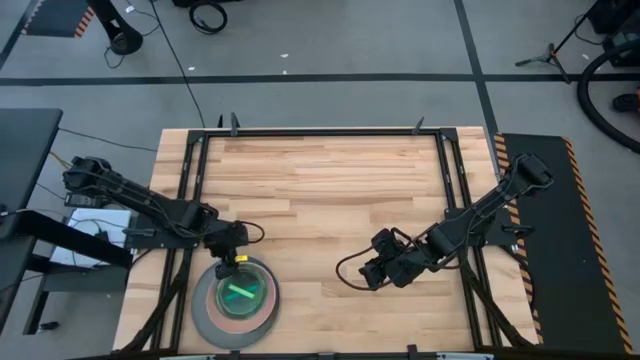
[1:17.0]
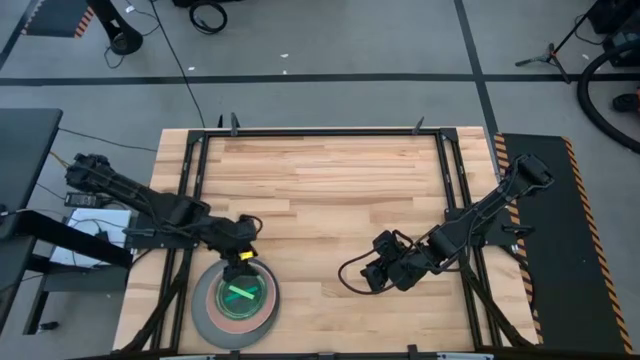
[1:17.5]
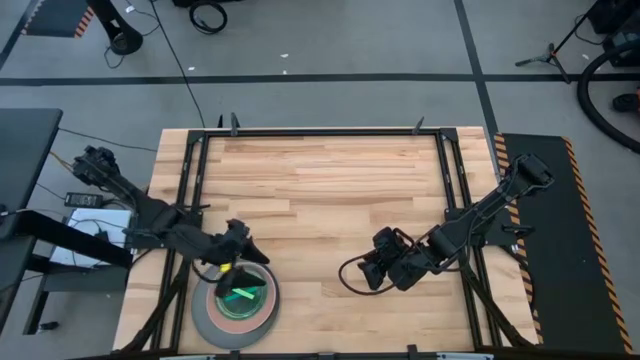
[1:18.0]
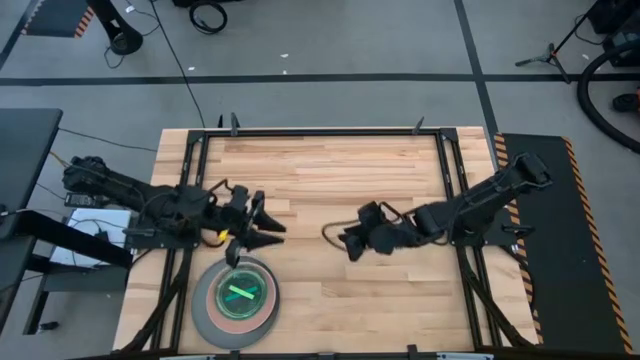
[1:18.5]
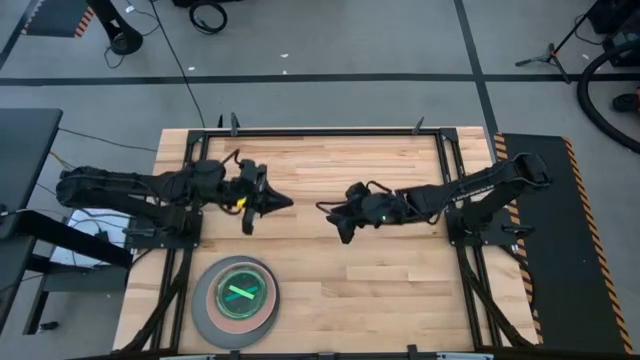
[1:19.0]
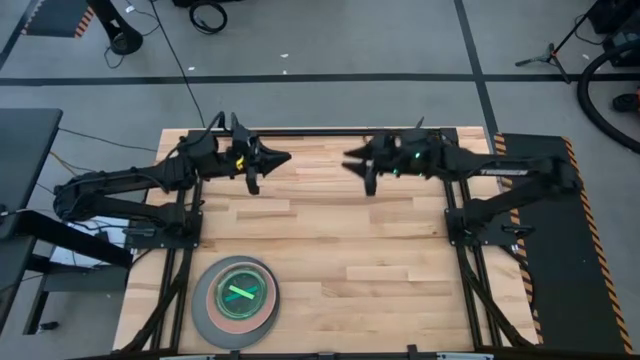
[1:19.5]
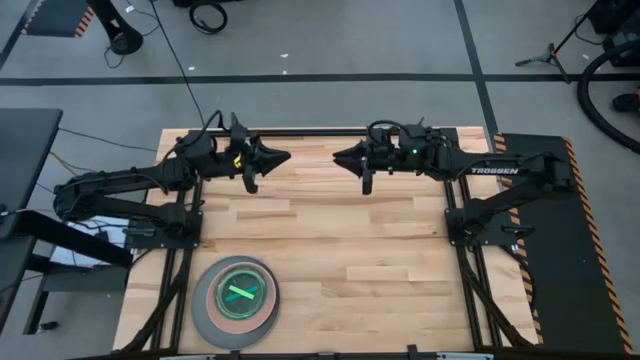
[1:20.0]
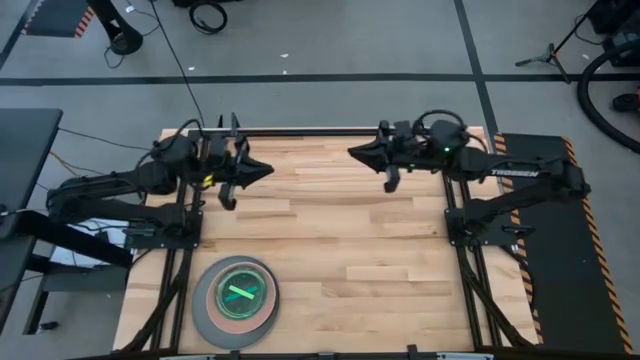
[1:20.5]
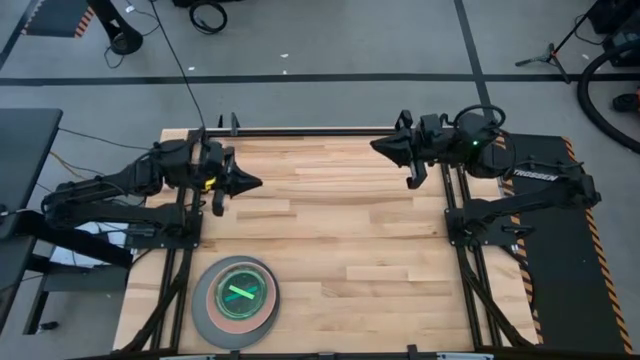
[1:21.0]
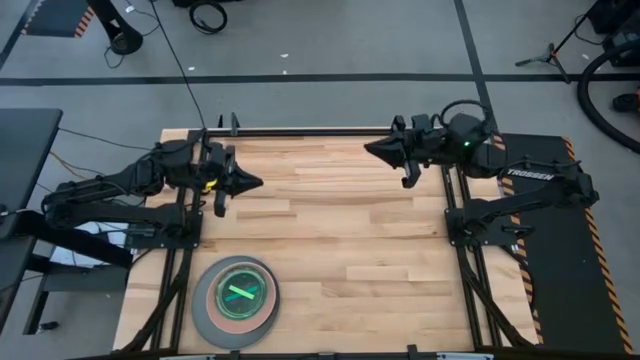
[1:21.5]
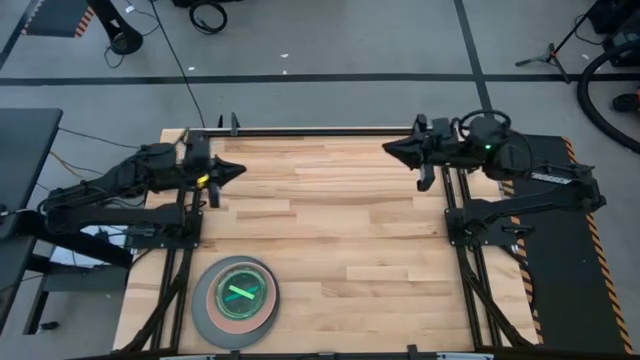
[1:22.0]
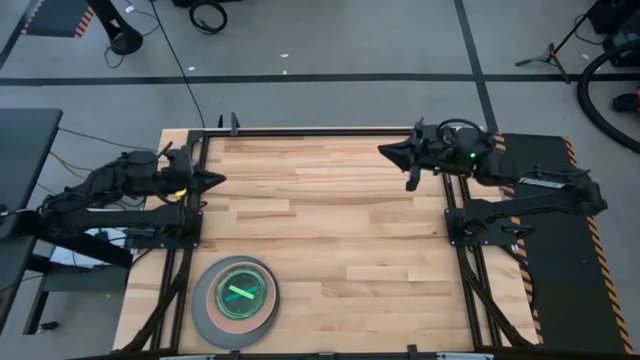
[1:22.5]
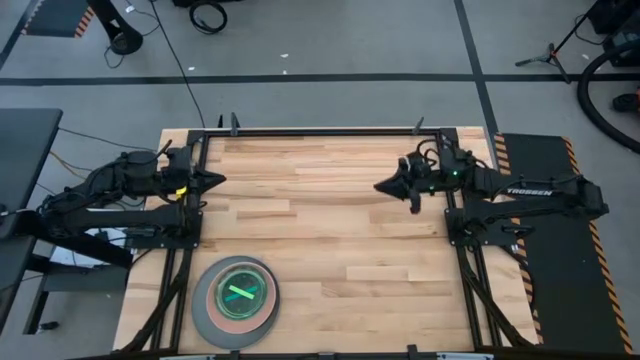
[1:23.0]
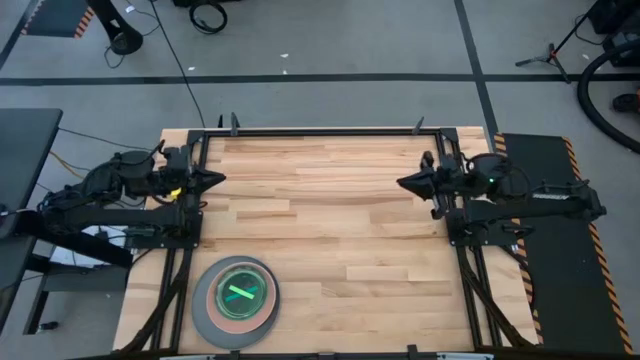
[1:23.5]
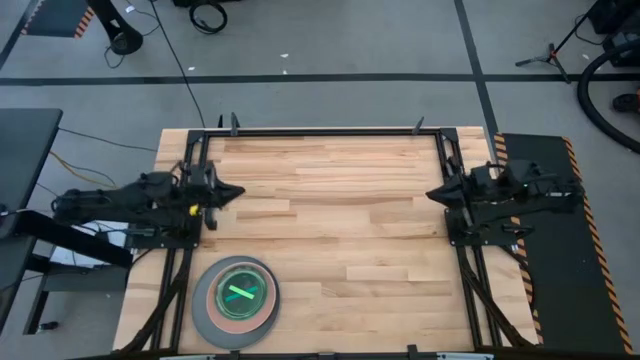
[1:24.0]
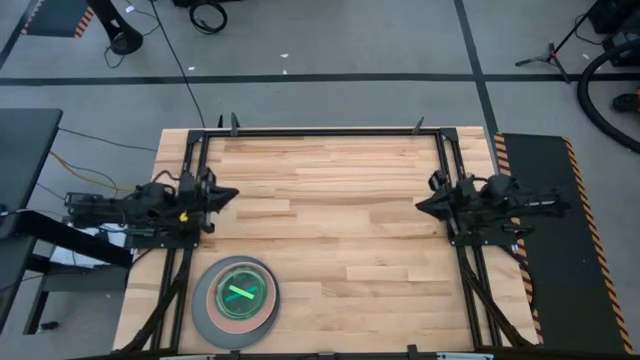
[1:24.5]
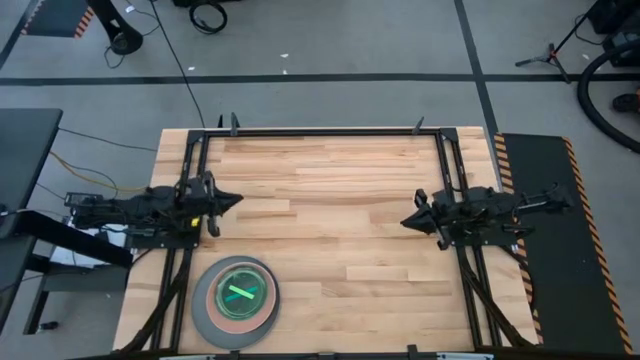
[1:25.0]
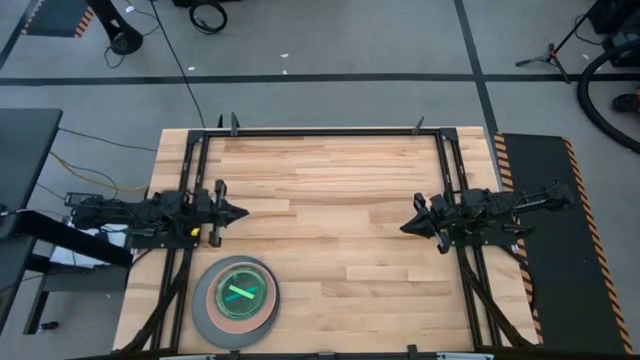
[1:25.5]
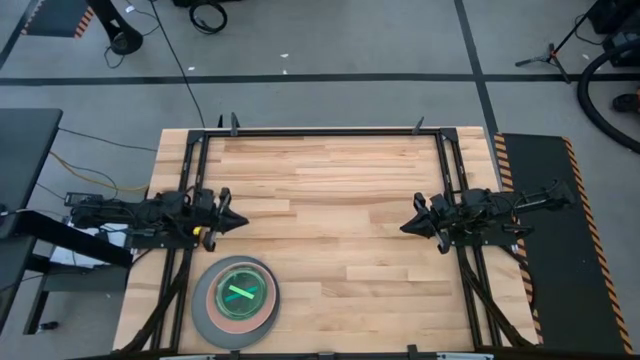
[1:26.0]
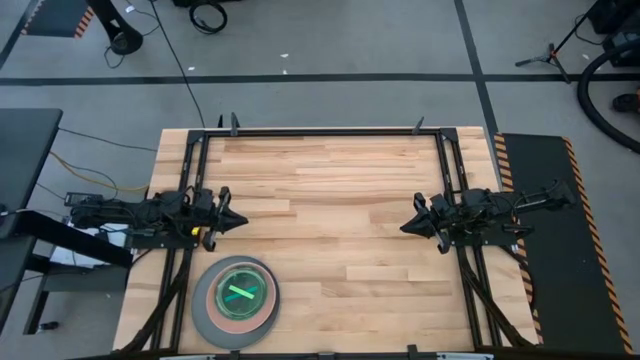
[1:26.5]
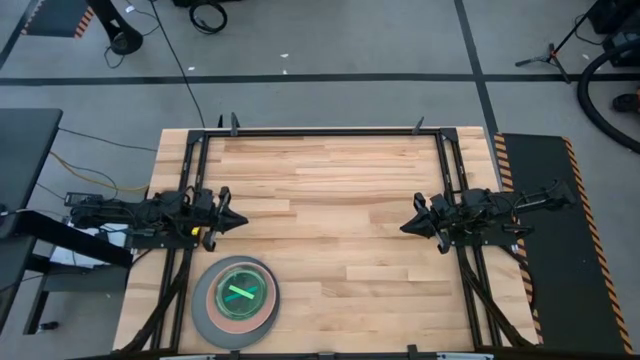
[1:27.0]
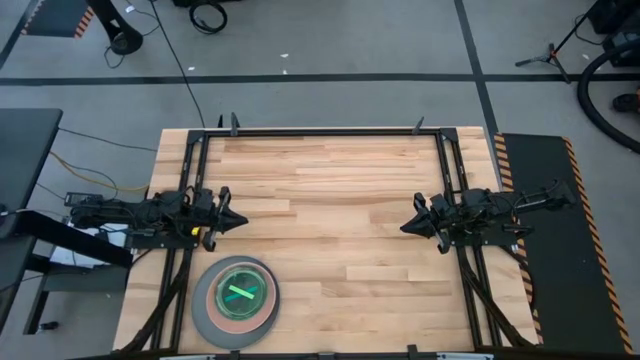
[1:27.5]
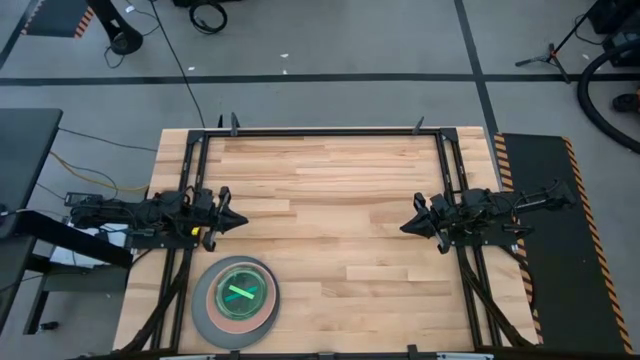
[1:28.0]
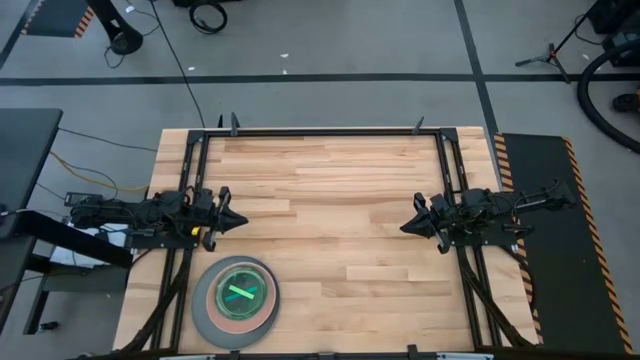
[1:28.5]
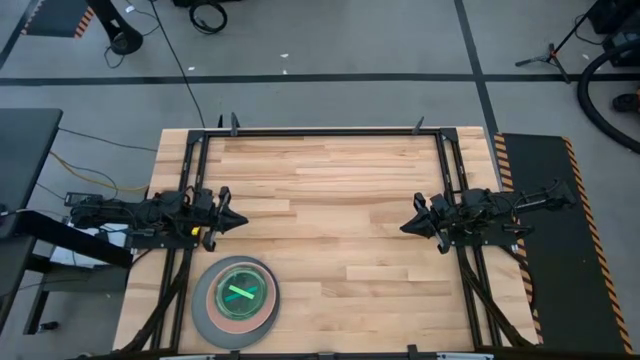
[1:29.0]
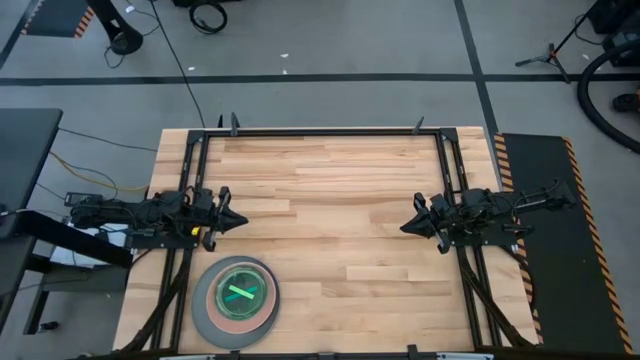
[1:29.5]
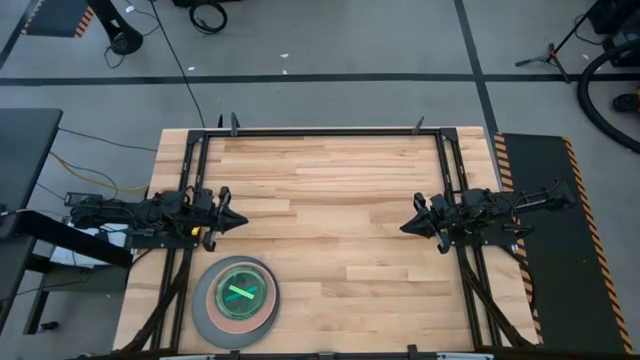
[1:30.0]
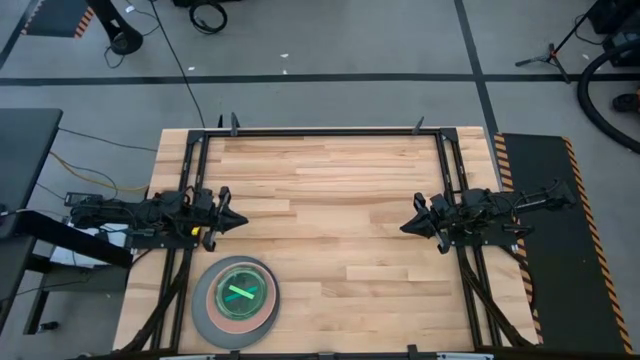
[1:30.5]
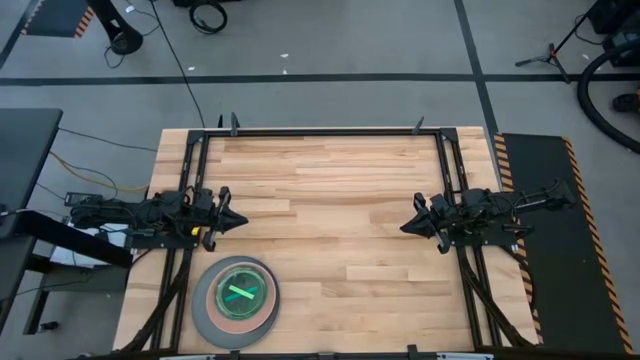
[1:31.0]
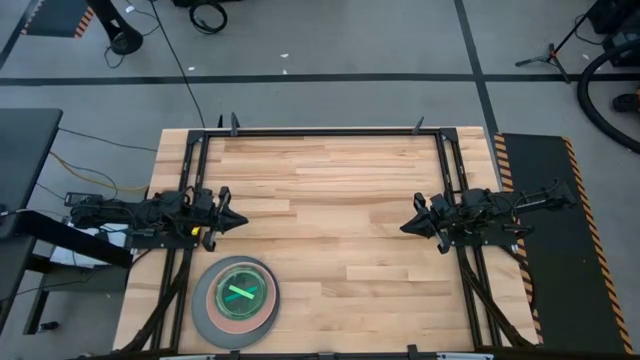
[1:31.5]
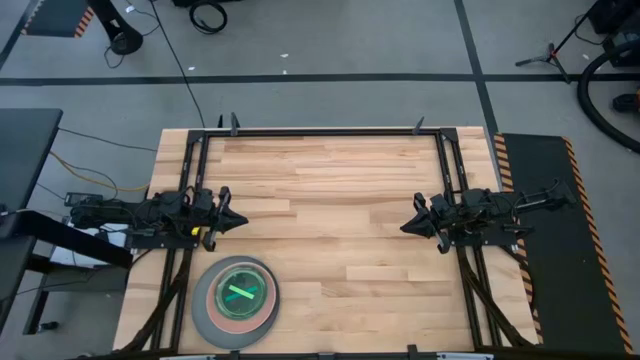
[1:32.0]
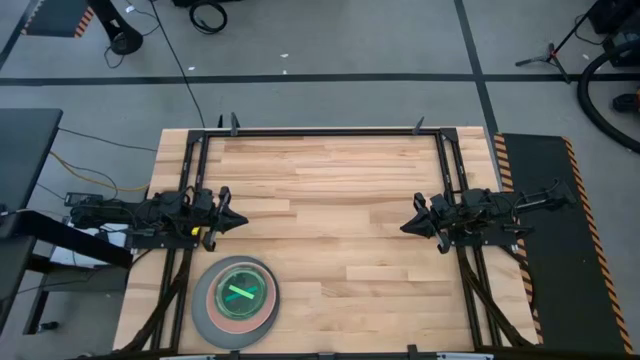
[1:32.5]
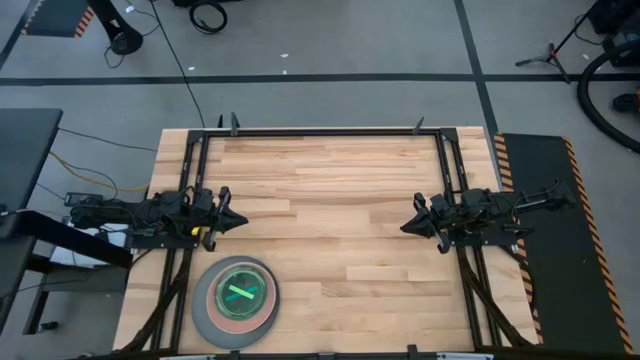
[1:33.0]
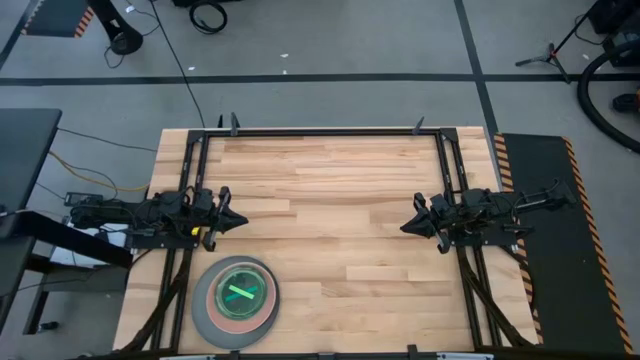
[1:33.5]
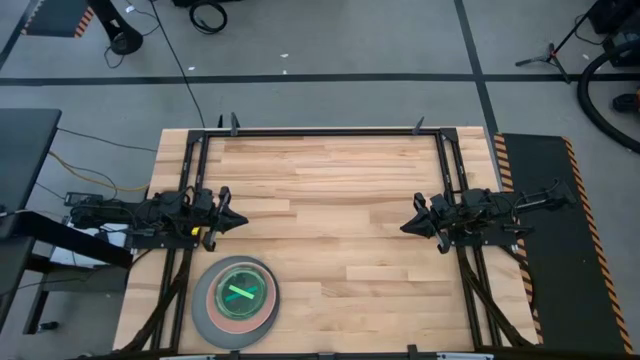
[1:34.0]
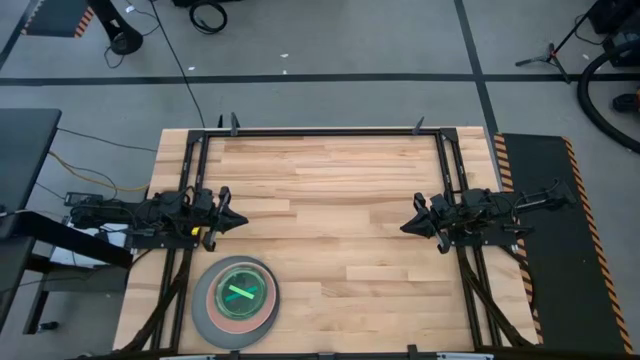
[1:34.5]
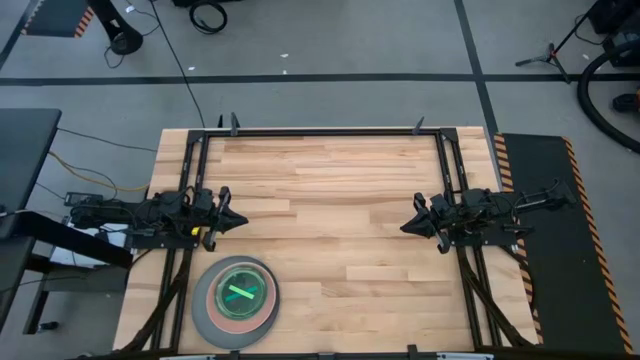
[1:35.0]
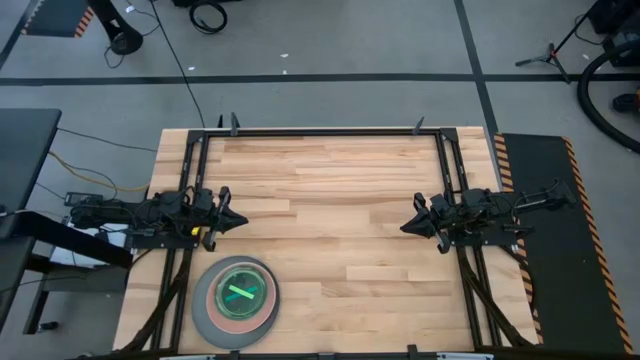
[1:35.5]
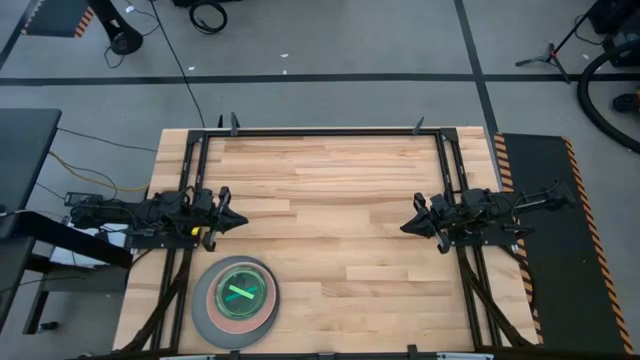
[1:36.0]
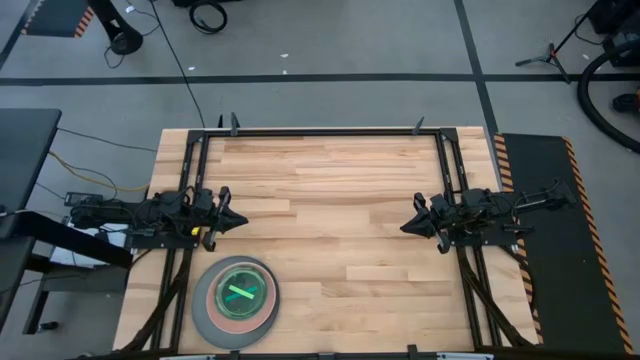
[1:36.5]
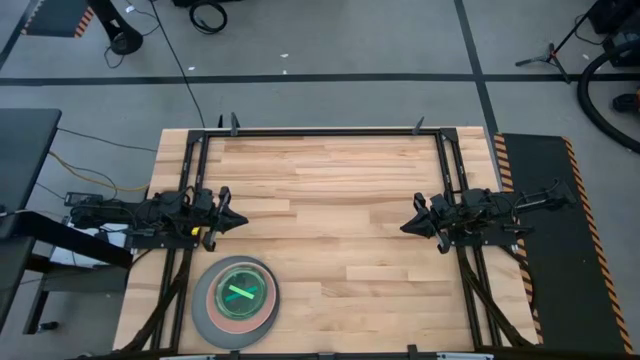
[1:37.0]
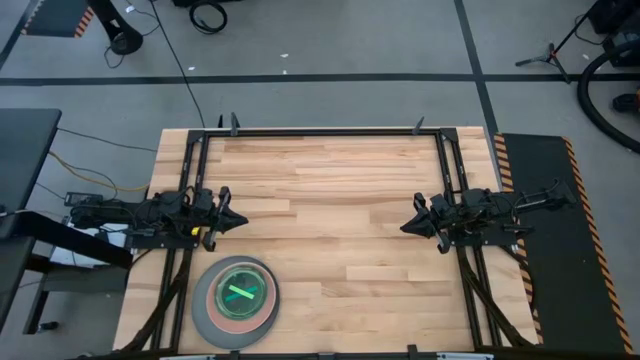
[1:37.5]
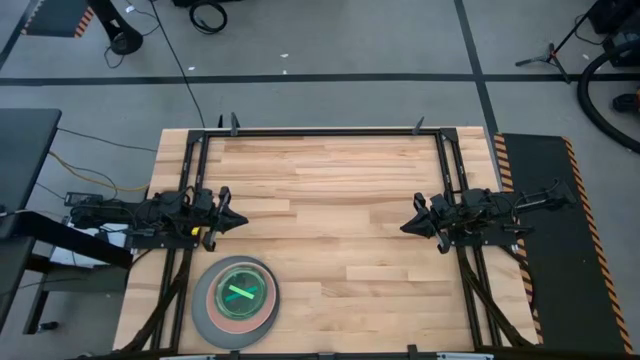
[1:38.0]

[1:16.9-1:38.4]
Task: Stack plastic plates
Return to Home Position
